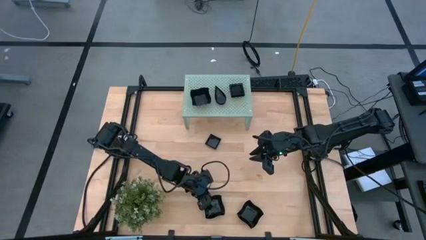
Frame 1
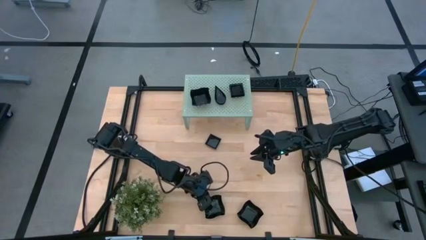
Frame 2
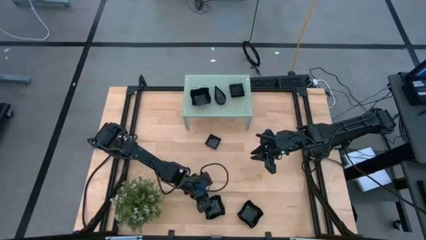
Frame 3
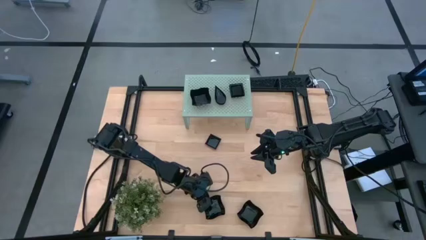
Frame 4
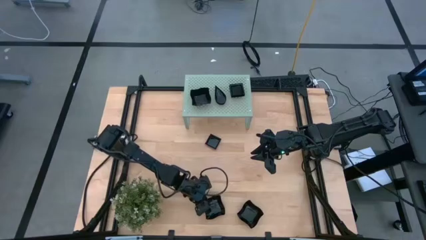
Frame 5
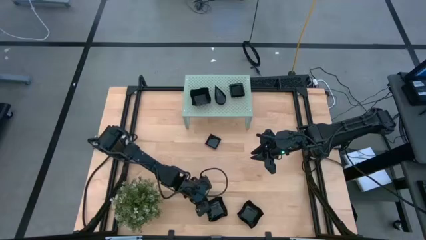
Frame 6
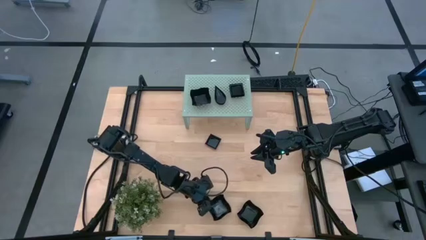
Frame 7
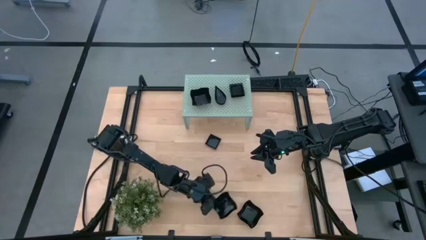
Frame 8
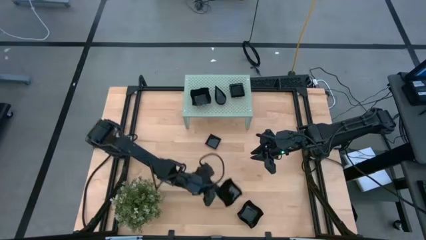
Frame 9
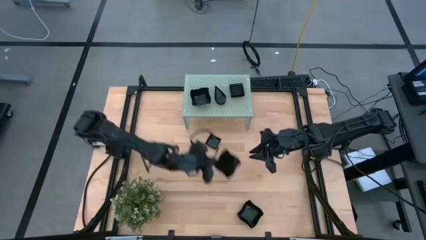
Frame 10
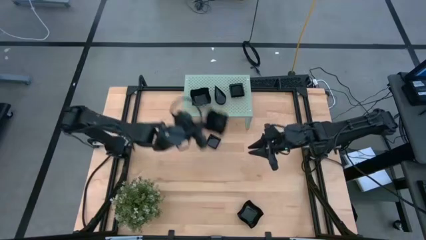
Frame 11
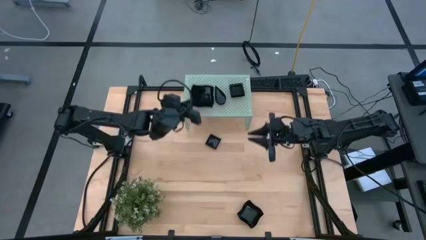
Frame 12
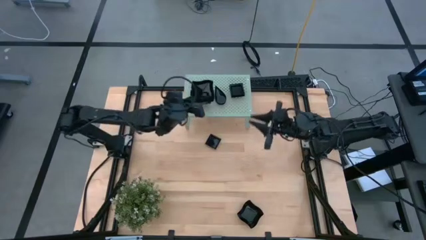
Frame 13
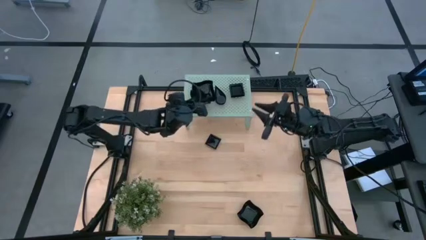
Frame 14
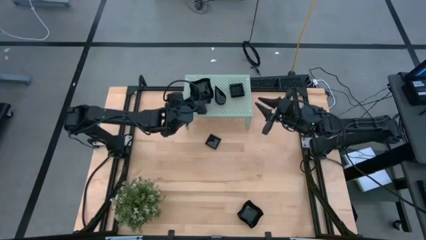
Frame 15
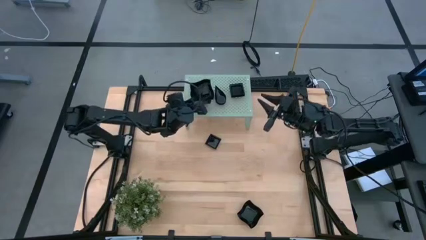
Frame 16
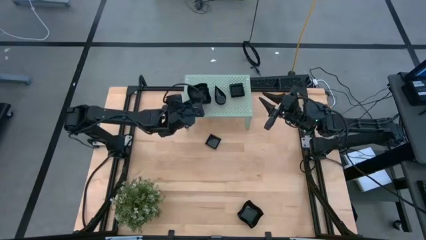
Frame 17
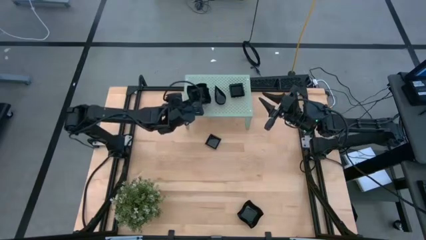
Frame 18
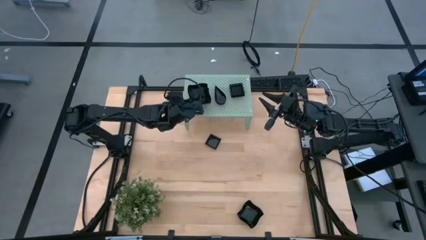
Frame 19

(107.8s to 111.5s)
Task: Pick & Place Mini shaped plates
Stack the black distorted square plate on the shelf

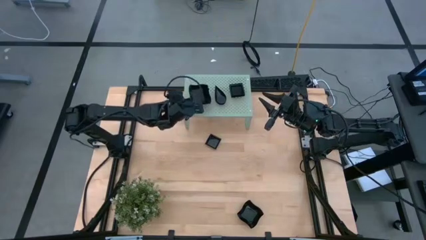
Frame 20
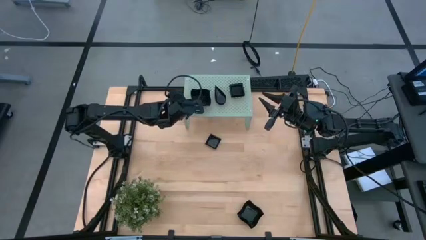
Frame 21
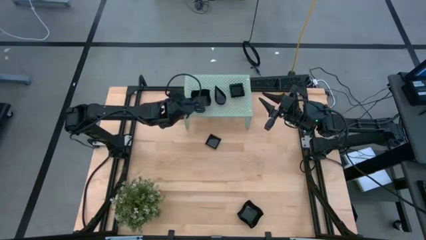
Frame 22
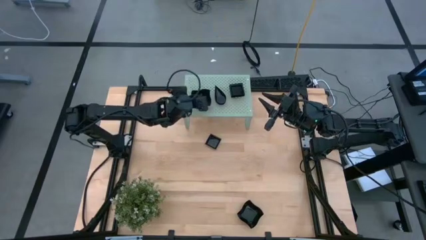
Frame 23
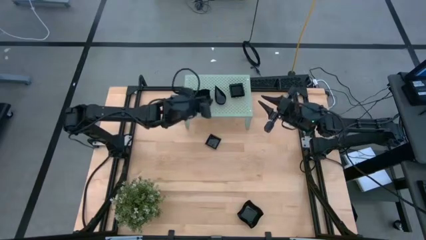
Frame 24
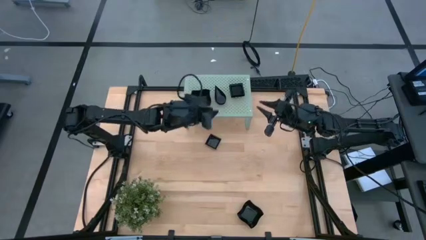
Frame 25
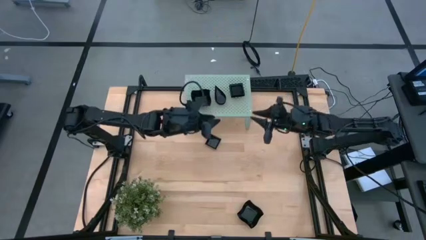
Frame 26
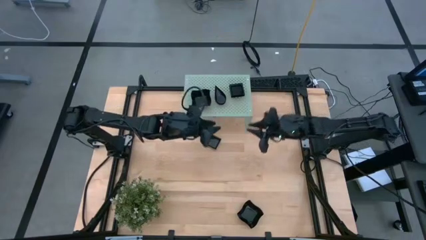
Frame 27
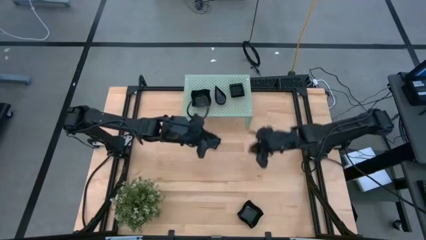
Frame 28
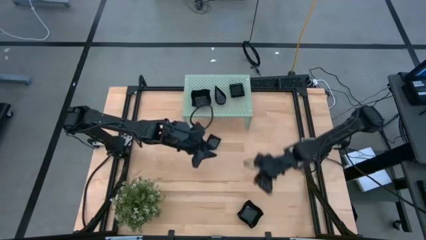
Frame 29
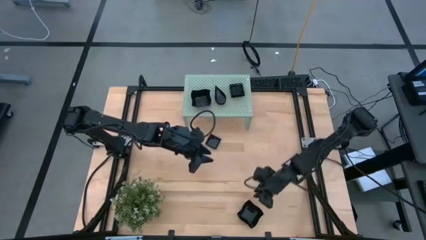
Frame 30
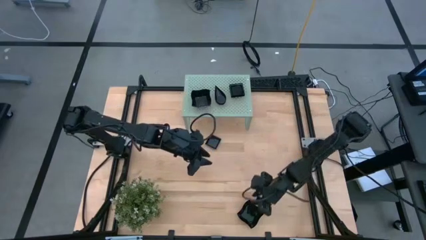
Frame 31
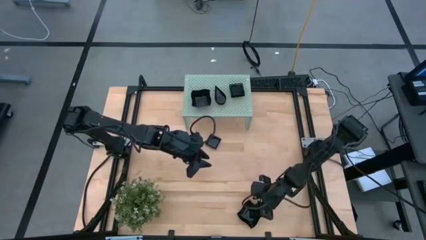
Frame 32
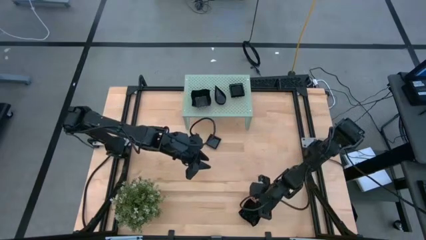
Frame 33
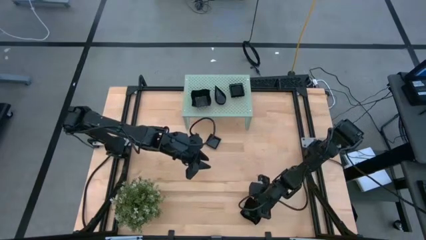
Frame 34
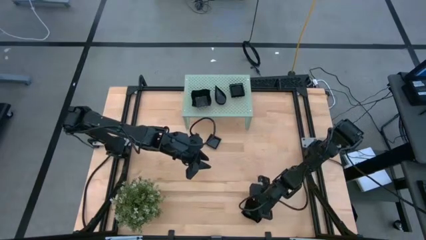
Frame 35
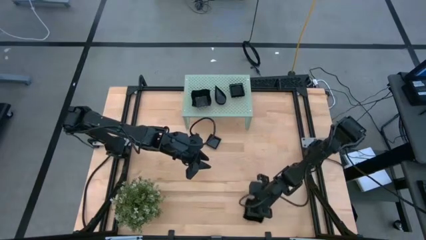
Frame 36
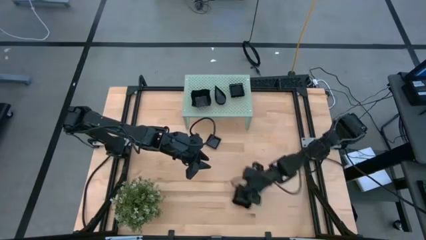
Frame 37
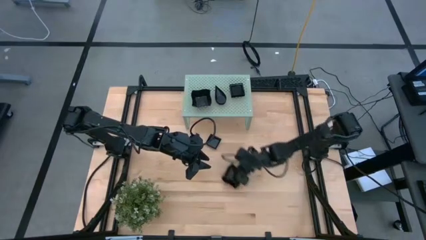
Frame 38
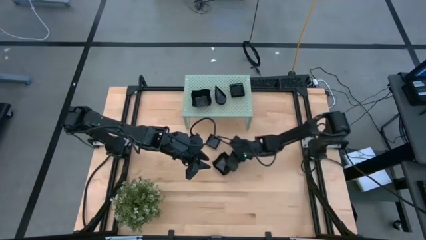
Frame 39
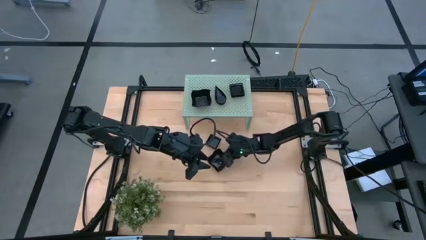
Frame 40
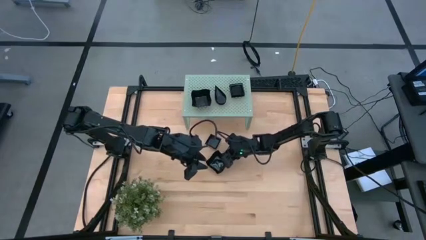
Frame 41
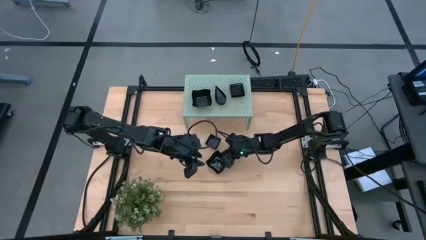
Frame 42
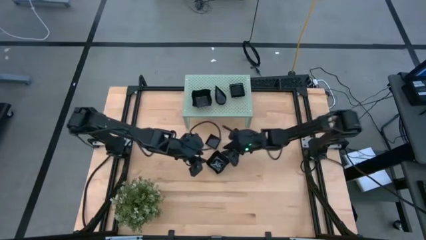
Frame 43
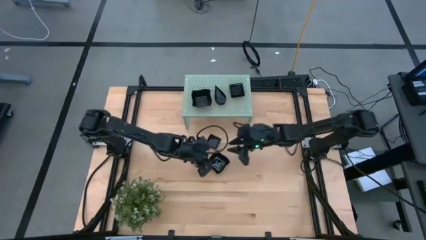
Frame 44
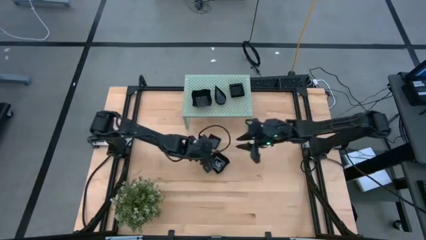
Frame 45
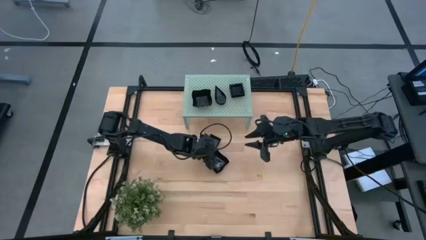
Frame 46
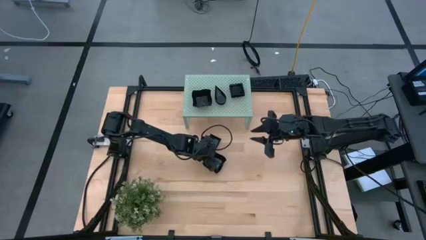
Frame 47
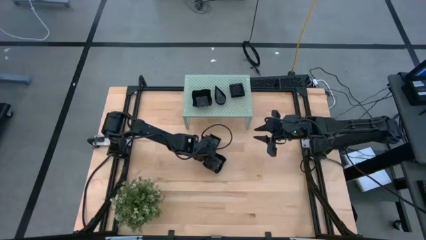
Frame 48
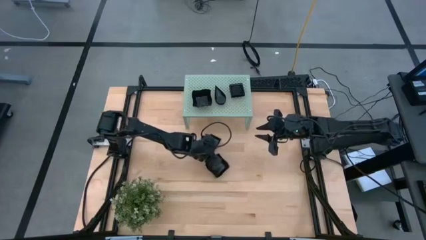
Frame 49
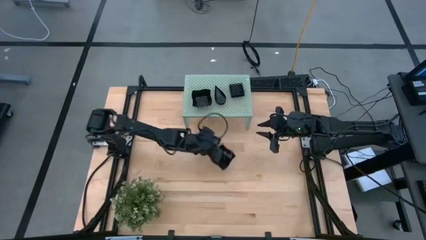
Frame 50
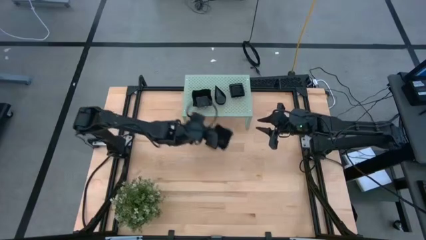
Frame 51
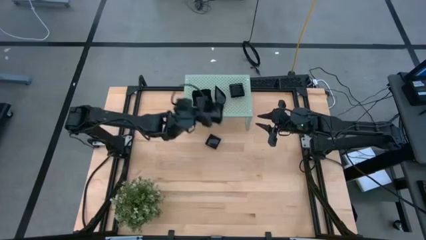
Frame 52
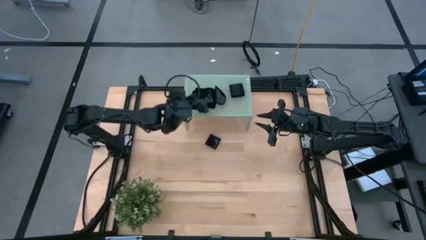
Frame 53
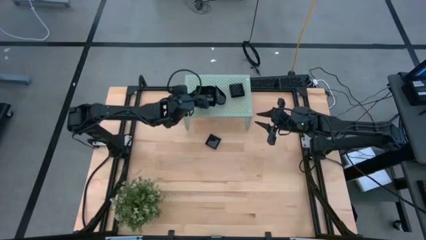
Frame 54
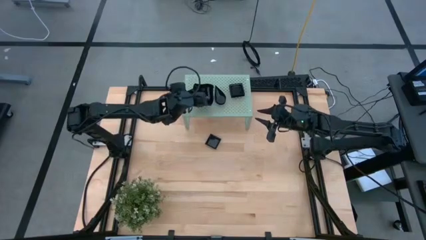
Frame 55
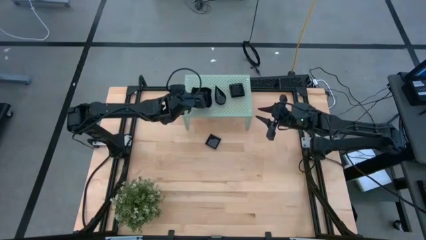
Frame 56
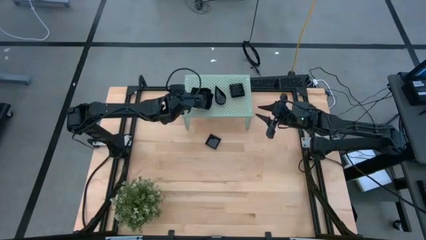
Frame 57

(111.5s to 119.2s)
Stack the black distorted square plate on the shelf

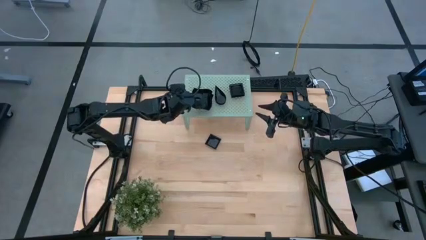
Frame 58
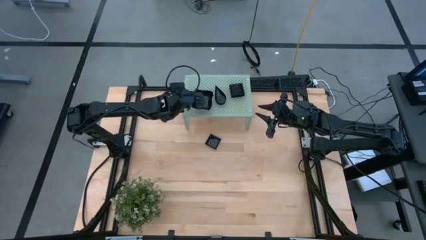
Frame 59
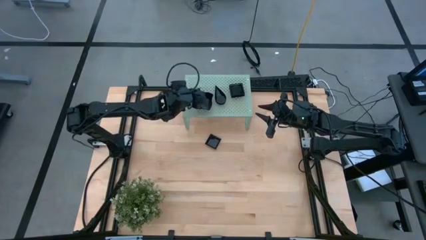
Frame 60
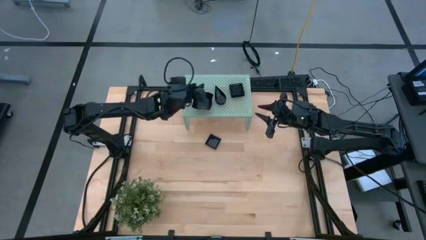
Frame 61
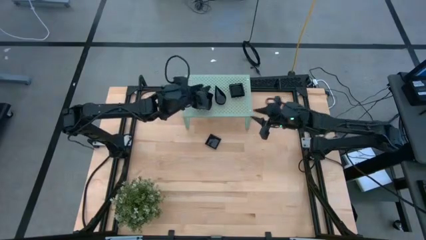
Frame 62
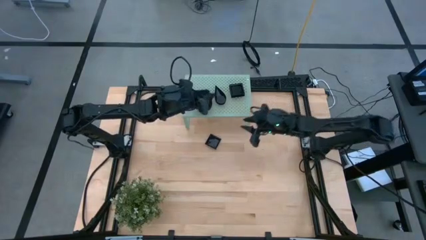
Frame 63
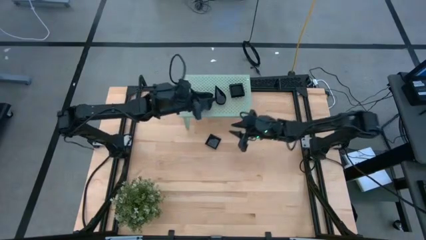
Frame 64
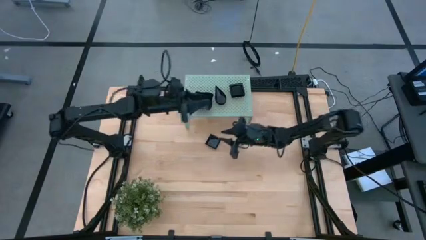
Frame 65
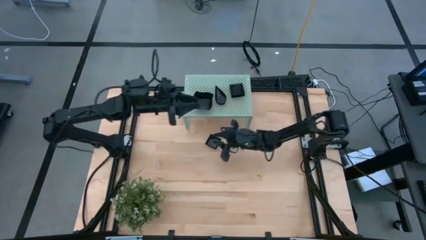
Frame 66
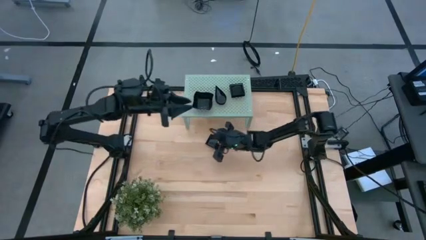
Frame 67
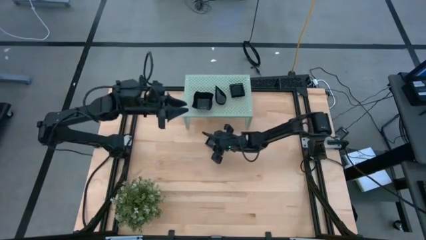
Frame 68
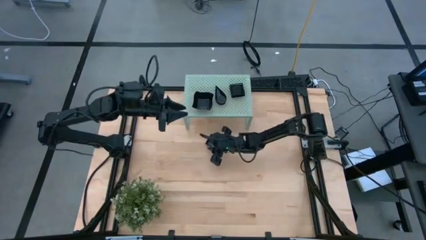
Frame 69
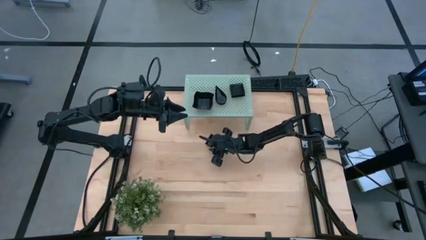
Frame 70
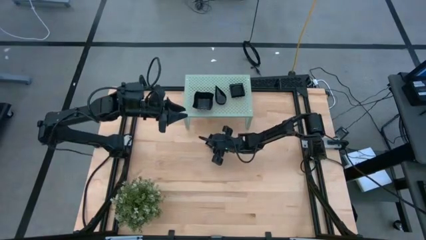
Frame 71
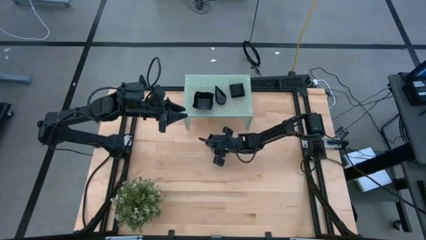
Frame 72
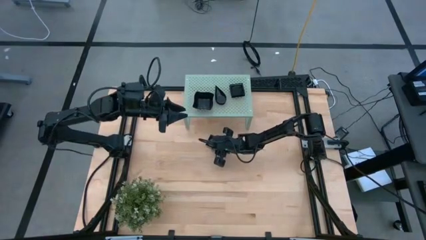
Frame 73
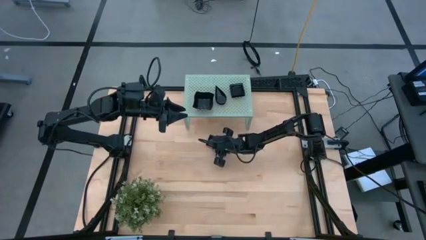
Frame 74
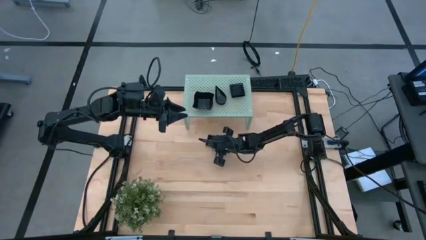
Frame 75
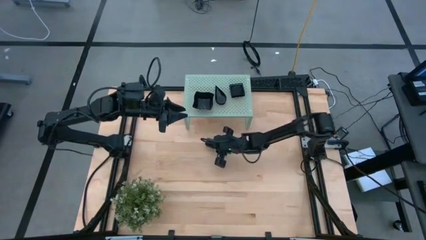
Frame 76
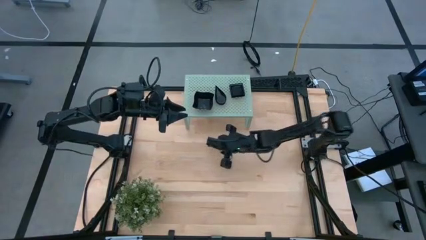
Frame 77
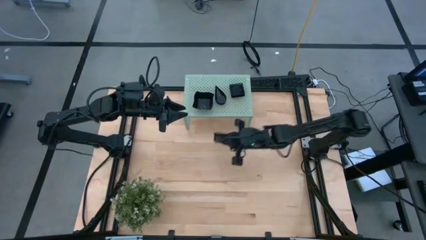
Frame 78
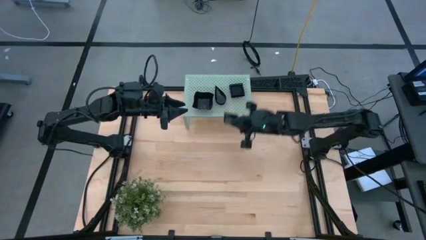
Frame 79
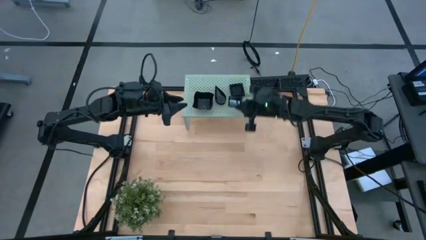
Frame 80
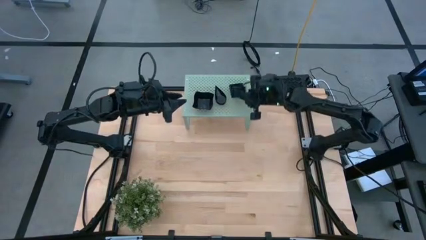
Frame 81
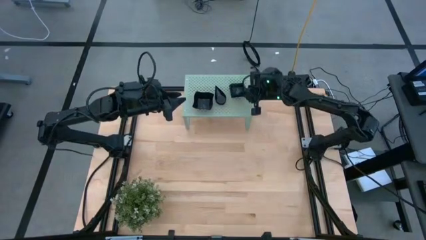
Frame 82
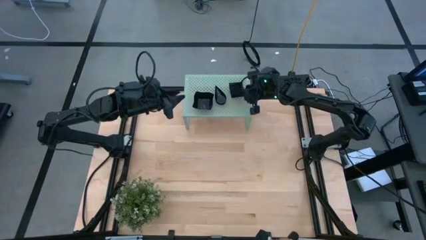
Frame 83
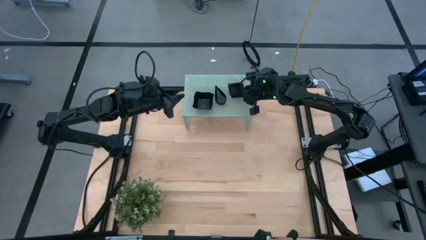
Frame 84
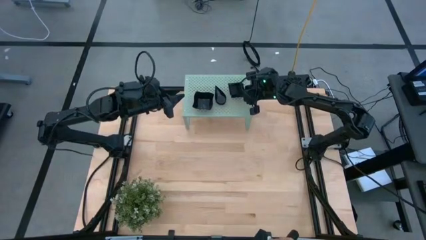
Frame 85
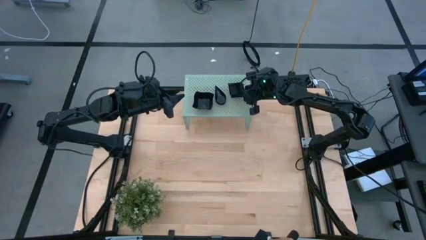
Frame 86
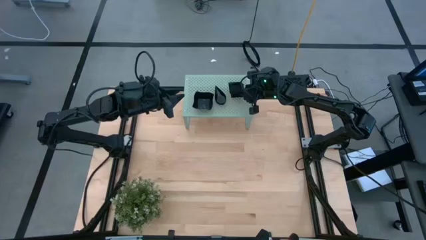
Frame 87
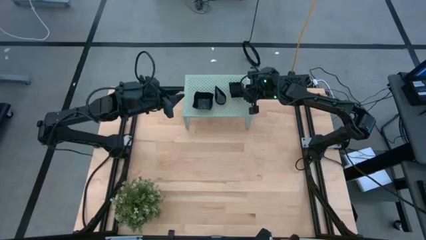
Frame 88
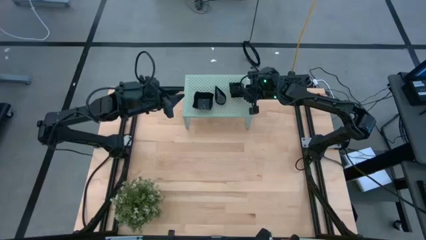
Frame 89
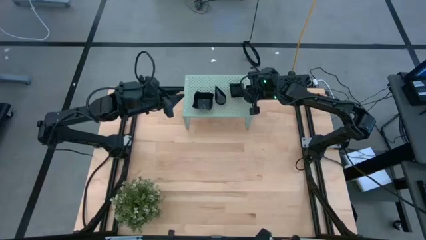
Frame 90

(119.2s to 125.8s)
Stack the black square plate on the shelf
